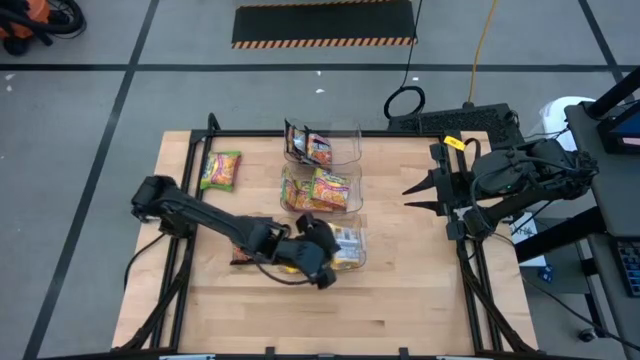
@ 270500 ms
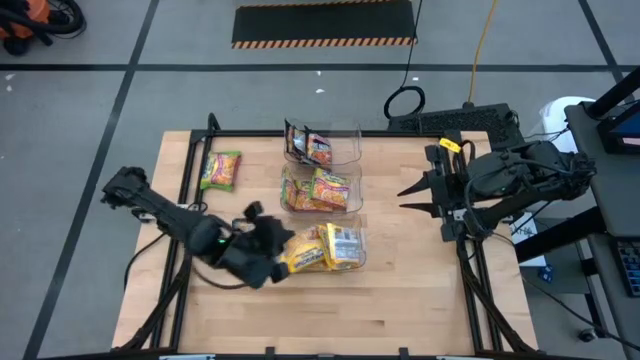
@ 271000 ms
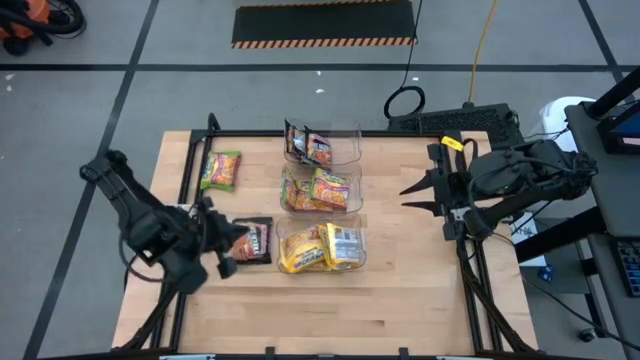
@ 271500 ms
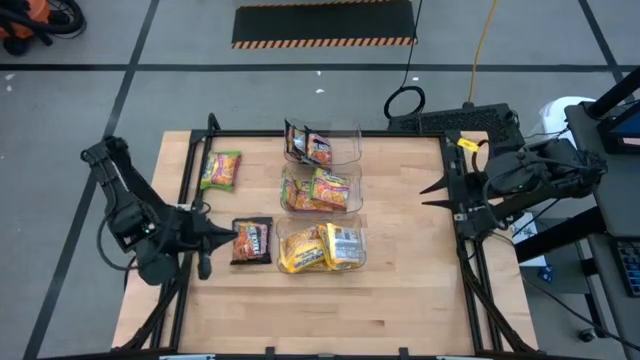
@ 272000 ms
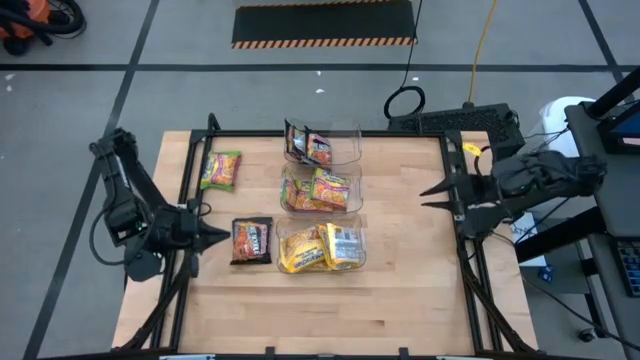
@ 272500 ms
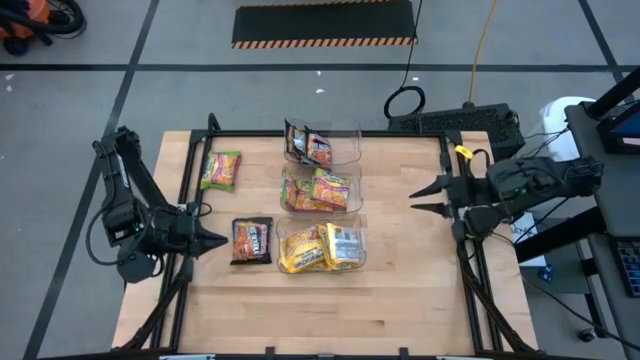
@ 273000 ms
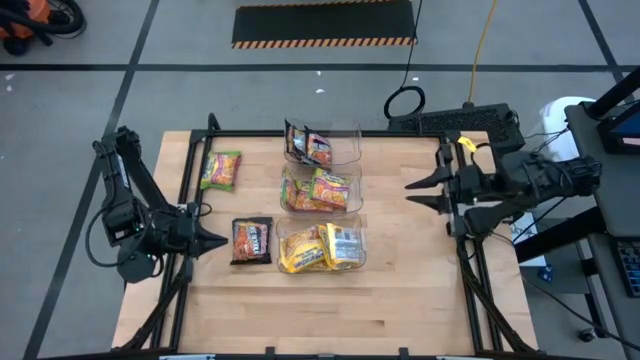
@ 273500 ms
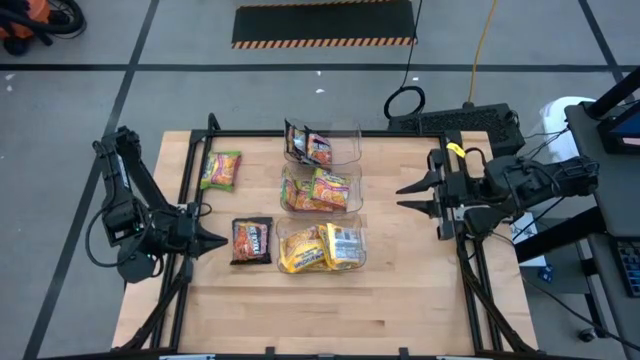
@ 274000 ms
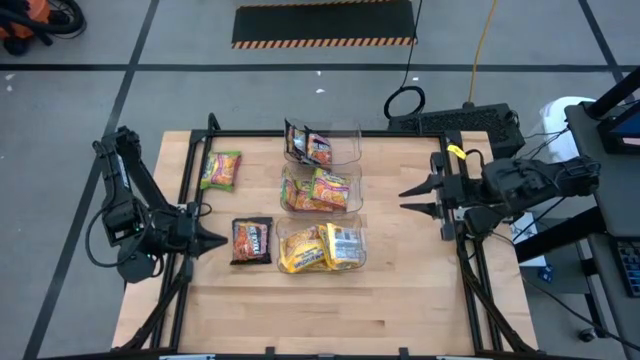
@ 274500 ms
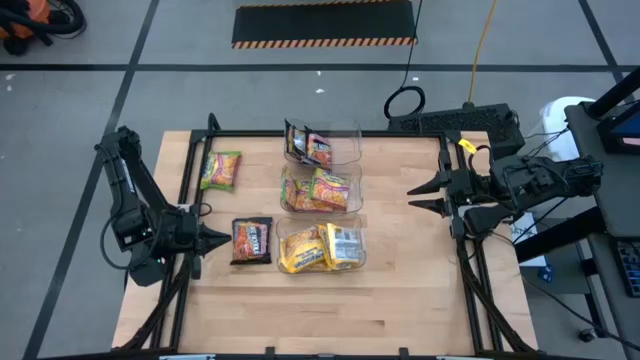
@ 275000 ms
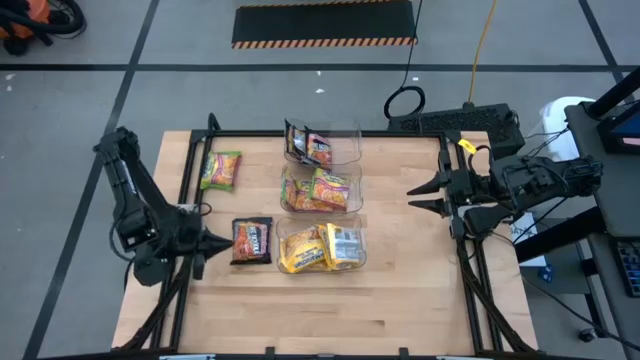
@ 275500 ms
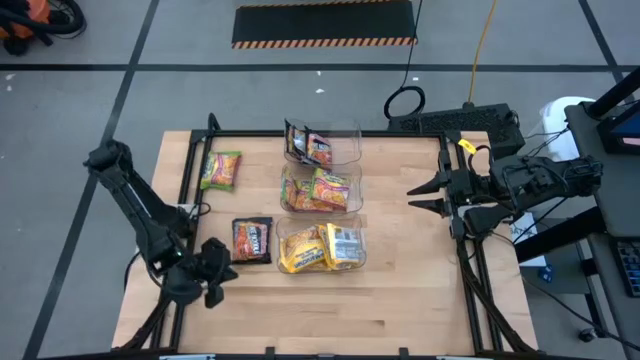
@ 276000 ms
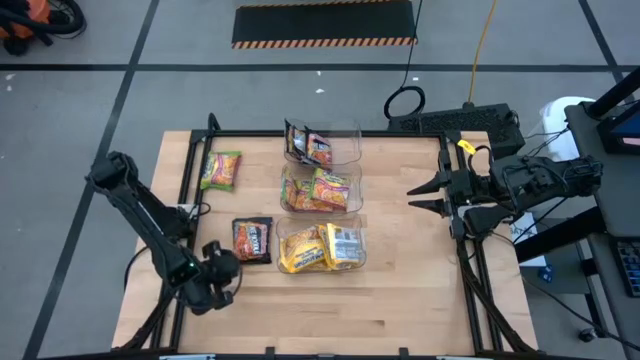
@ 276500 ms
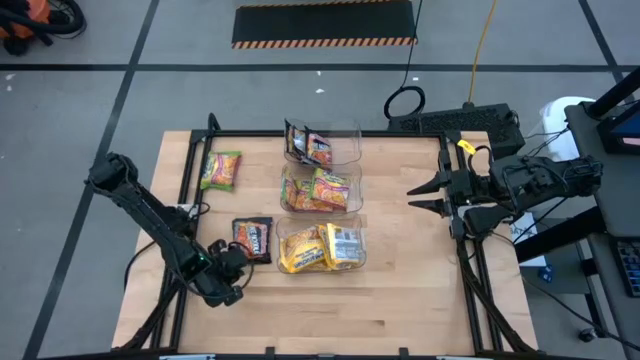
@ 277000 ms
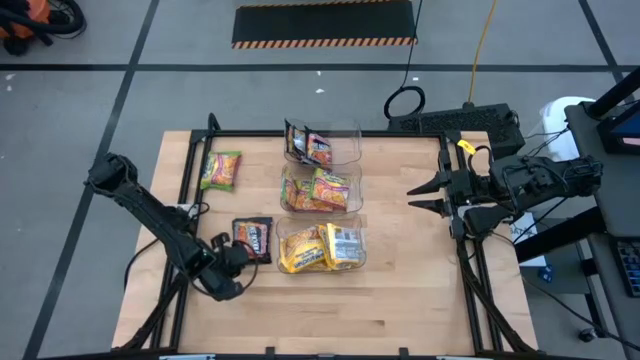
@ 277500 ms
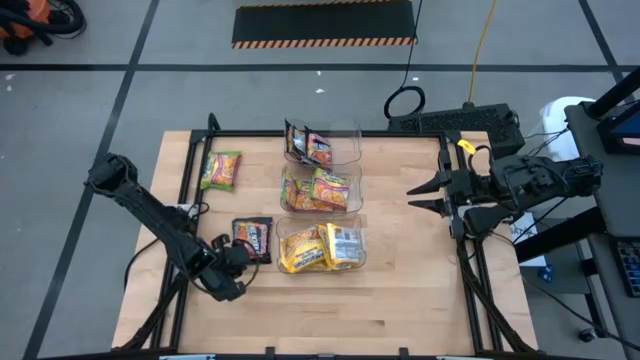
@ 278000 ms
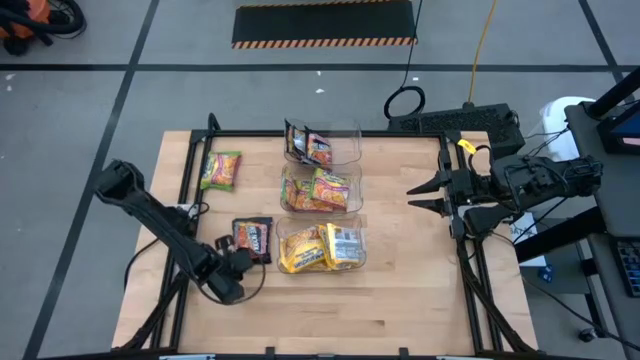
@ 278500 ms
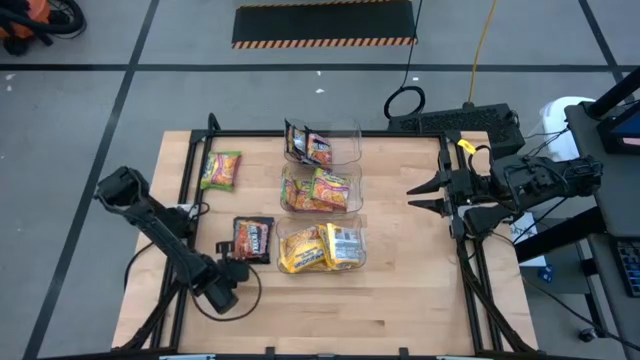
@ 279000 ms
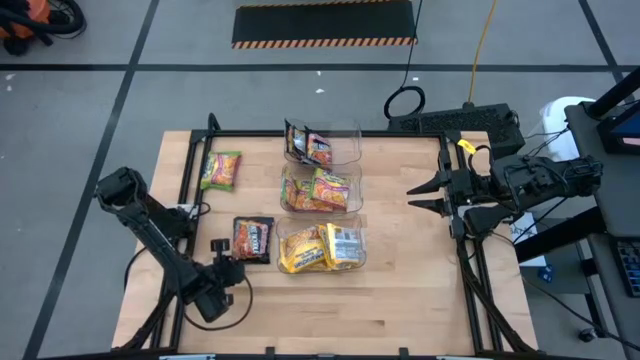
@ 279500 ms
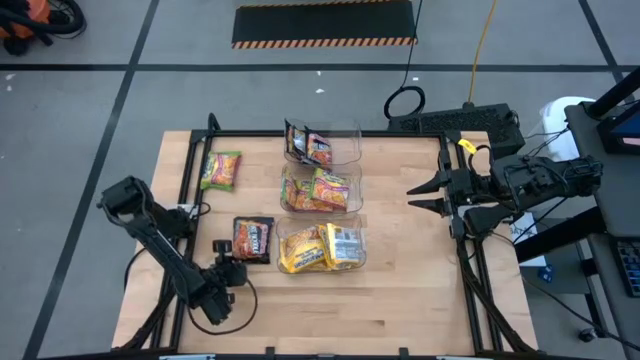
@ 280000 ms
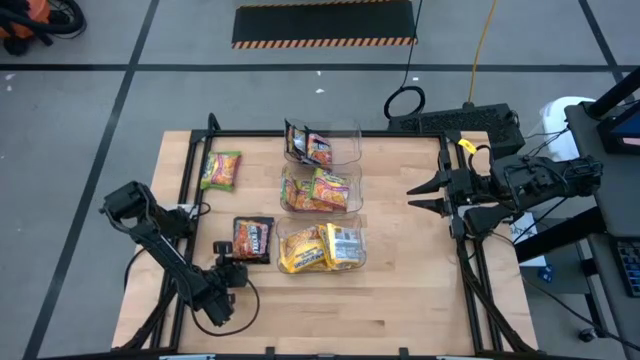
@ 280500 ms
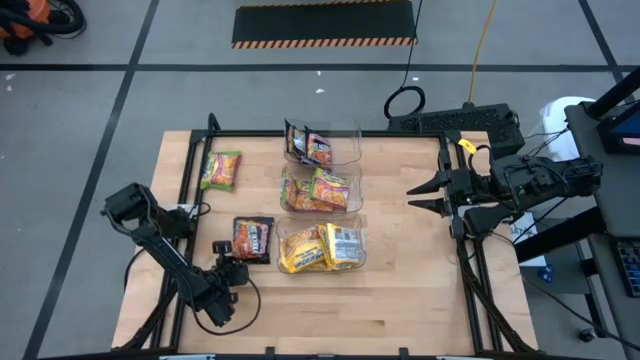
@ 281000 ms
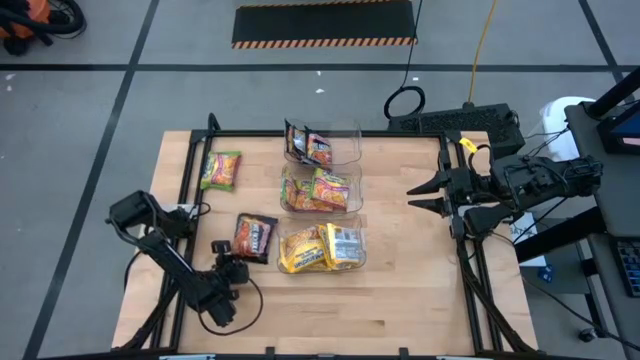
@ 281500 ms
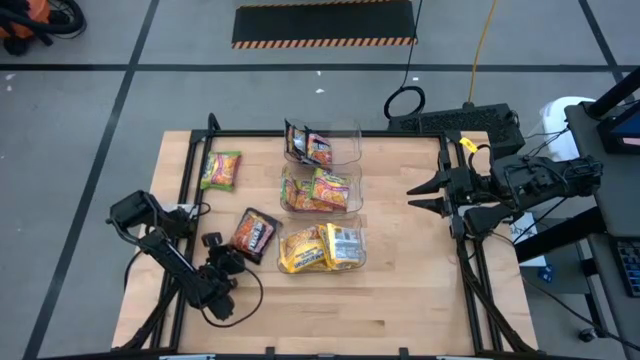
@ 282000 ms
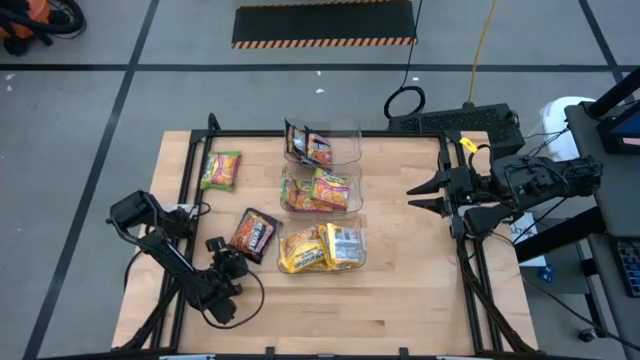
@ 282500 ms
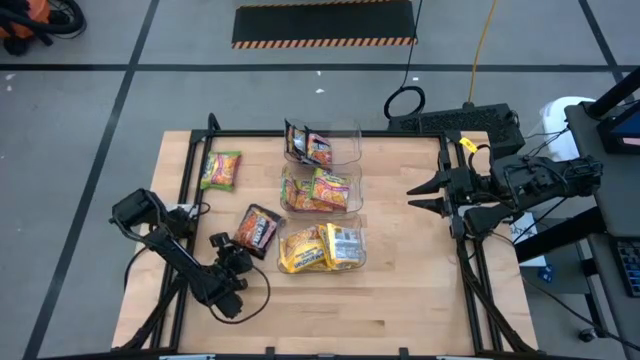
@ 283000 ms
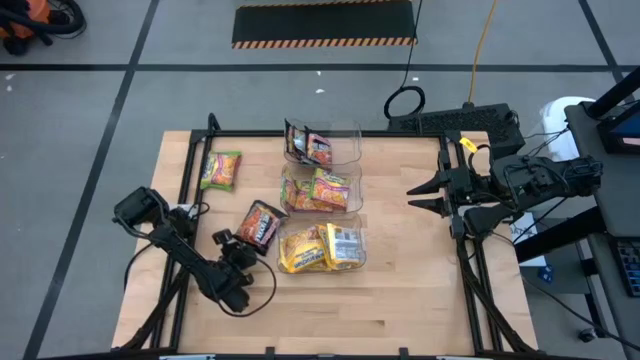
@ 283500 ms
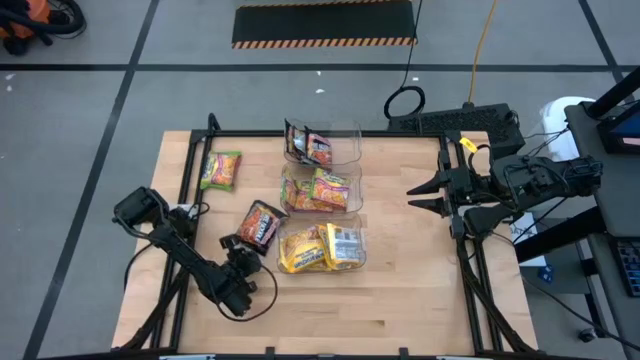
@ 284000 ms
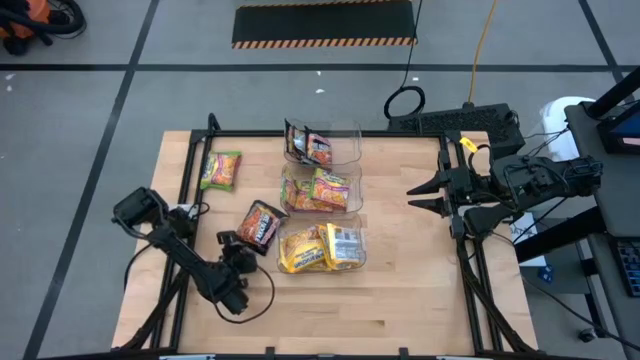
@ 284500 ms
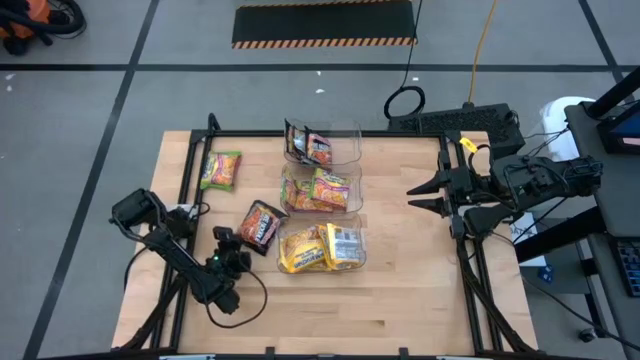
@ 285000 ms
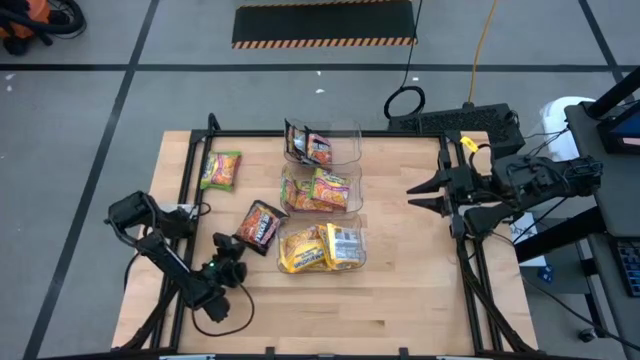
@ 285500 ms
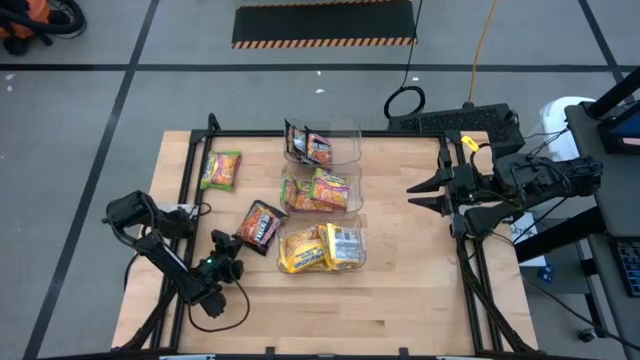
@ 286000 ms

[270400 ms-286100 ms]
Task: Sort Maruchan noodles
Put the black noodle pack into the top transparent bin

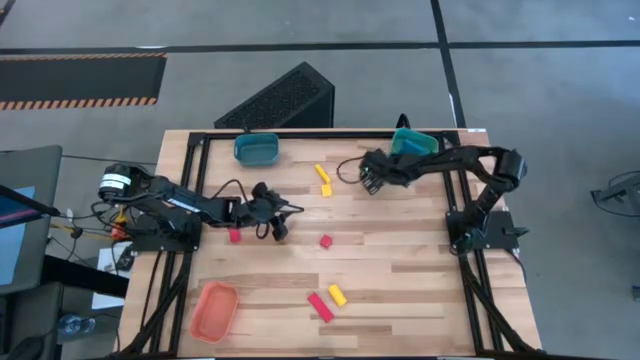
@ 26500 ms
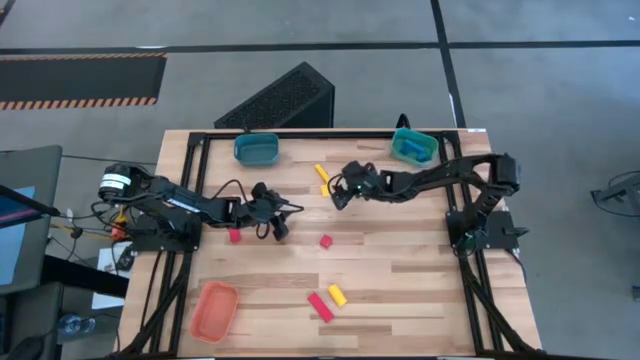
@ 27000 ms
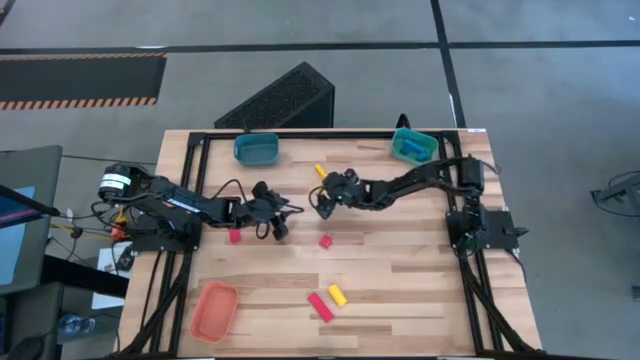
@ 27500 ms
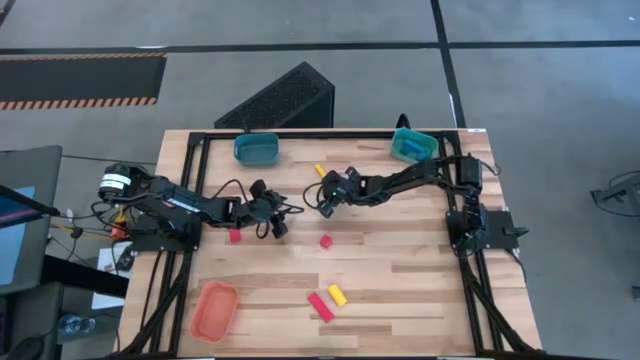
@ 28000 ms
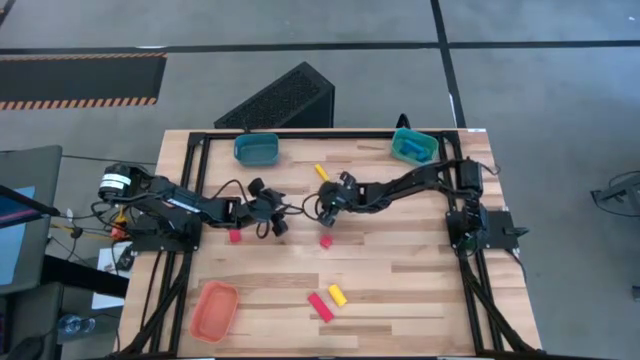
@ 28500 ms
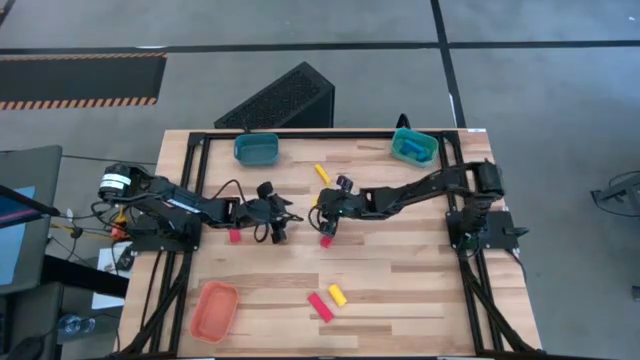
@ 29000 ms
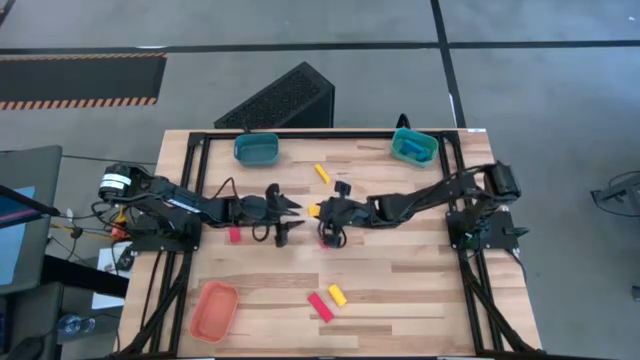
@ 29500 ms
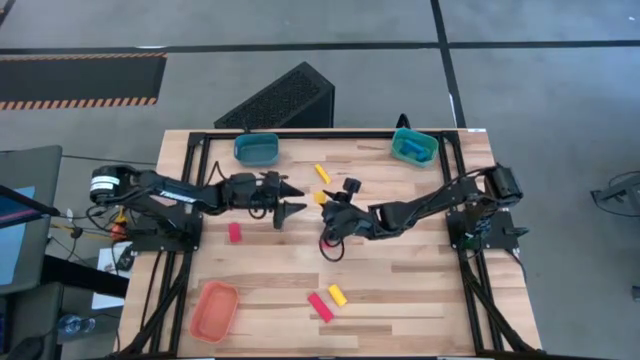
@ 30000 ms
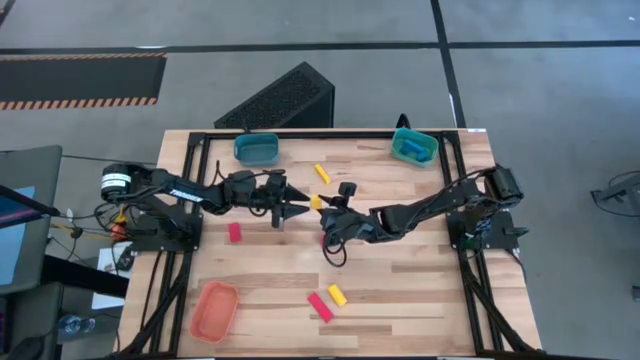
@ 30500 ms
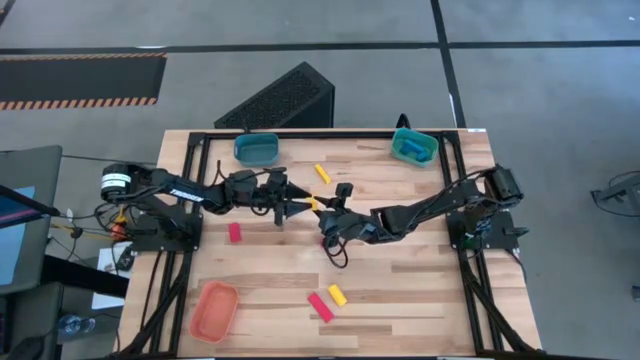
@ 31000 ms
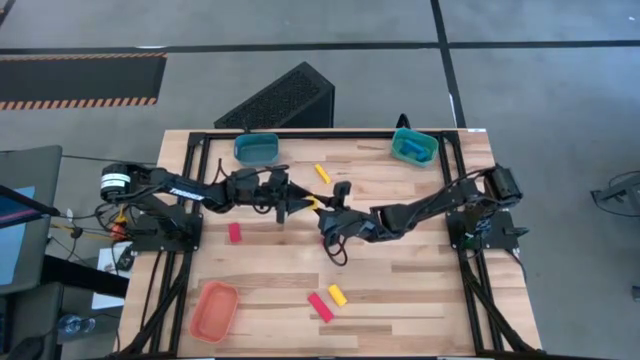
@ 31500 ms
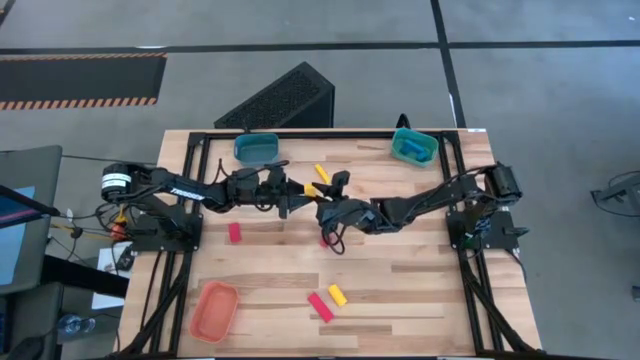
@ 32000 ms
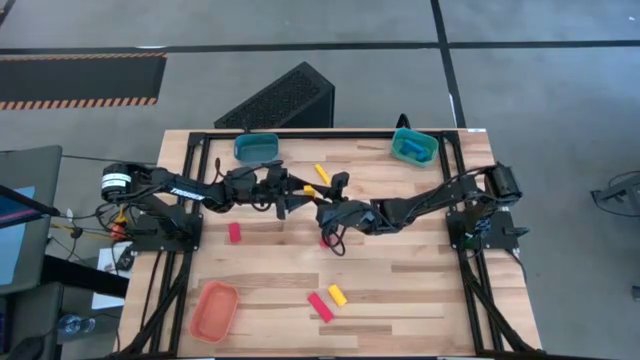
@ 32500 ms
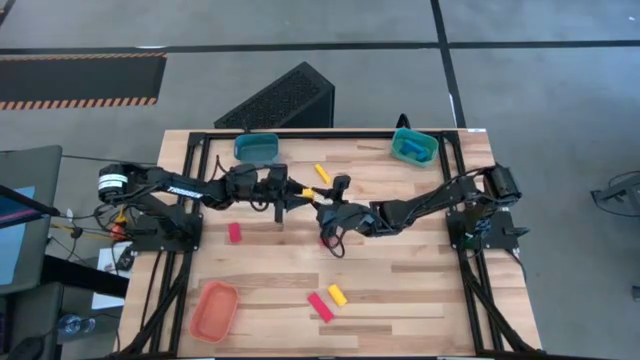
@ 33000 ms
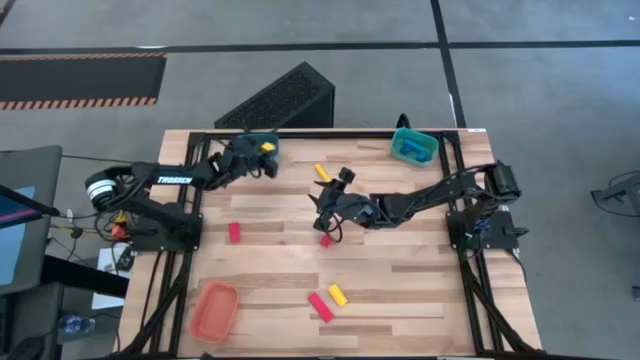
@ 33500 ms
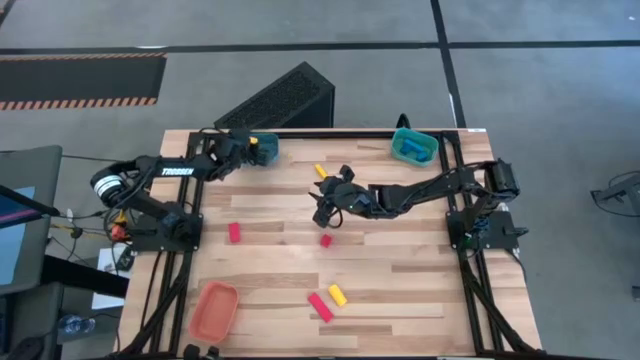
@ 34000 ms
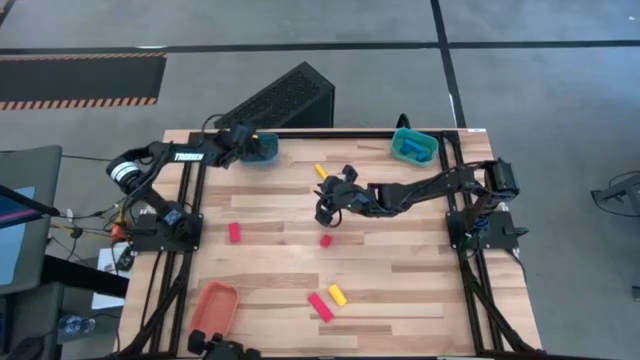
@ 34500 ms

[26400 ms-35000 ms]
Task: Sort & place blocks by color
Put the middle yellow block into the blue bin
